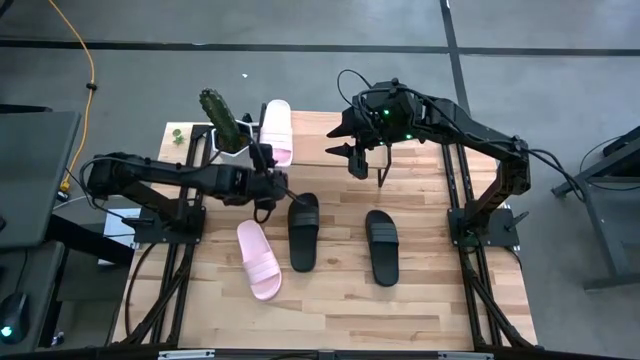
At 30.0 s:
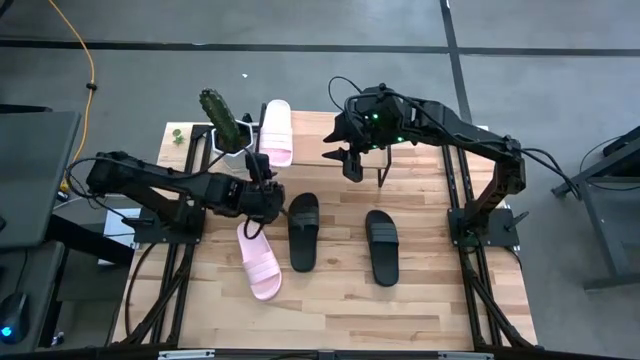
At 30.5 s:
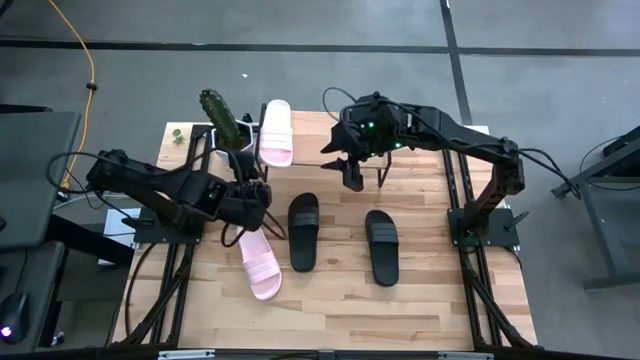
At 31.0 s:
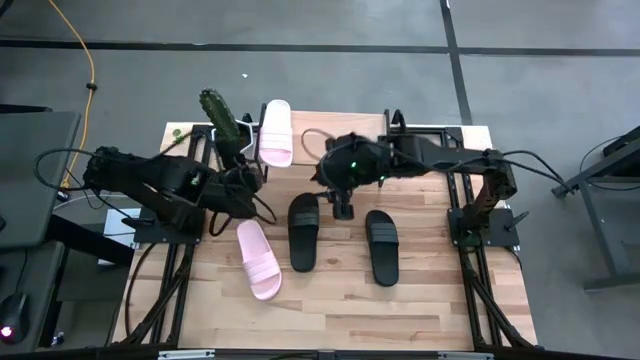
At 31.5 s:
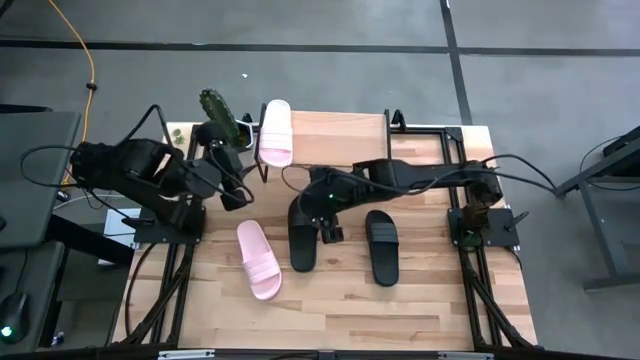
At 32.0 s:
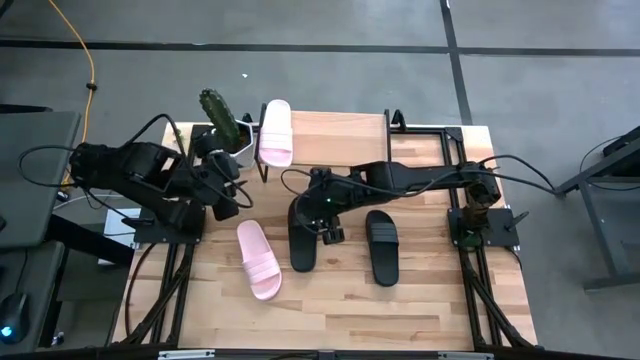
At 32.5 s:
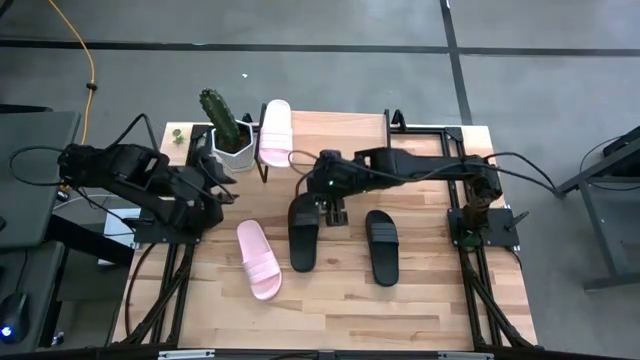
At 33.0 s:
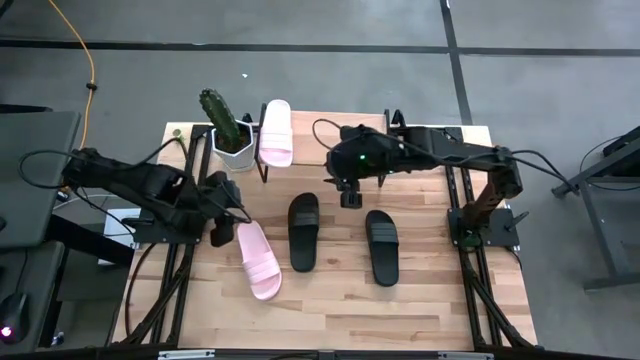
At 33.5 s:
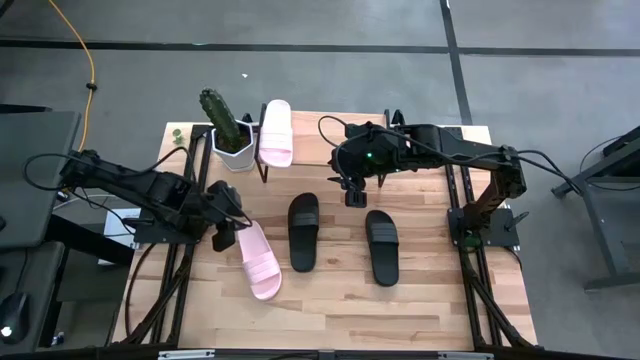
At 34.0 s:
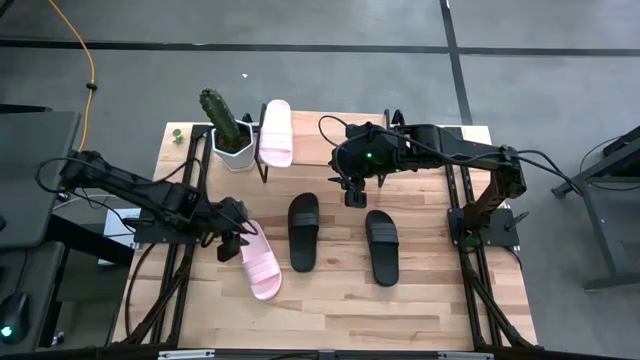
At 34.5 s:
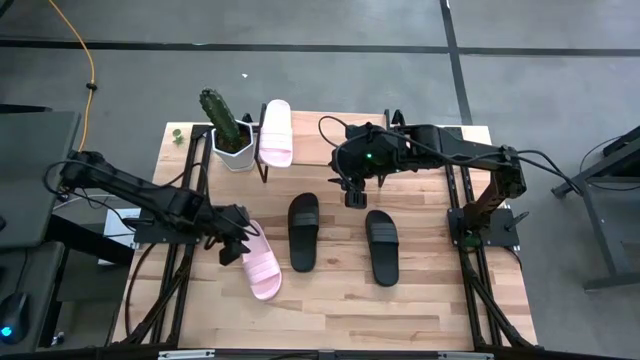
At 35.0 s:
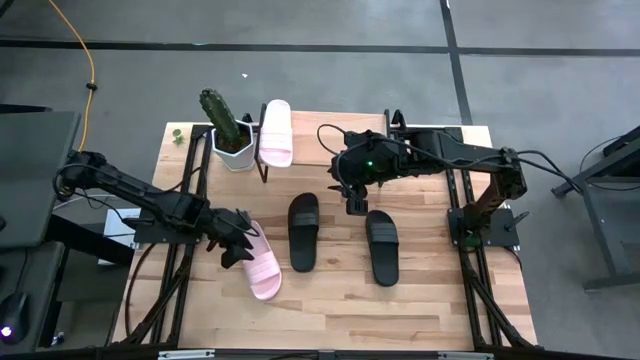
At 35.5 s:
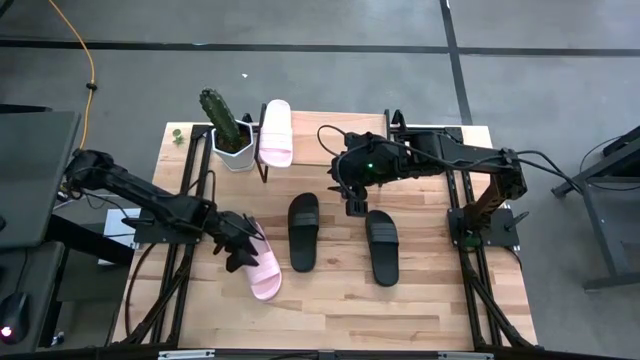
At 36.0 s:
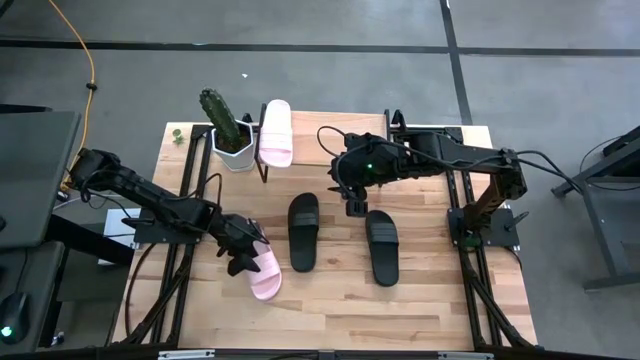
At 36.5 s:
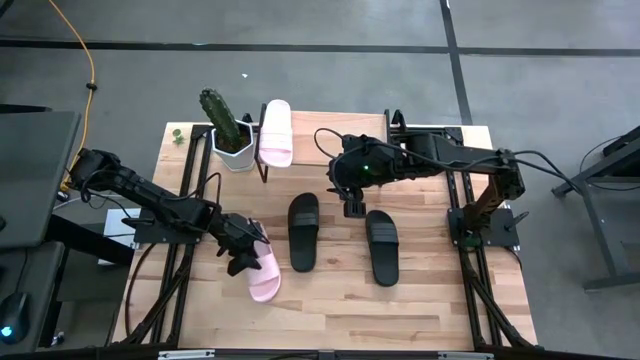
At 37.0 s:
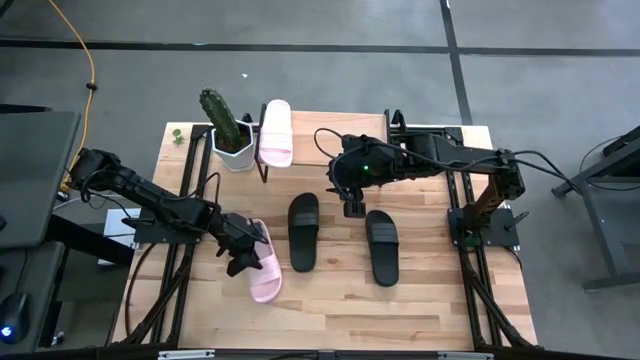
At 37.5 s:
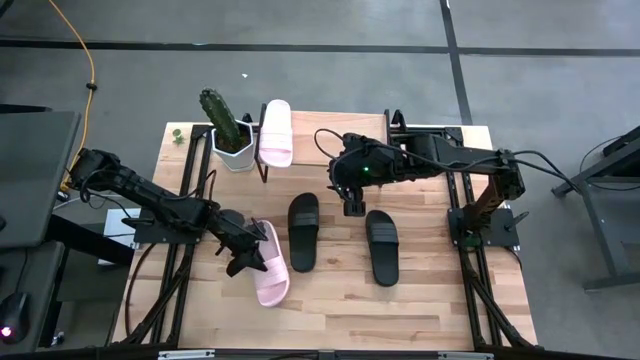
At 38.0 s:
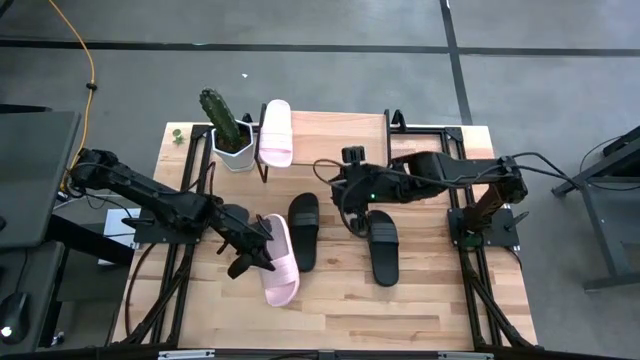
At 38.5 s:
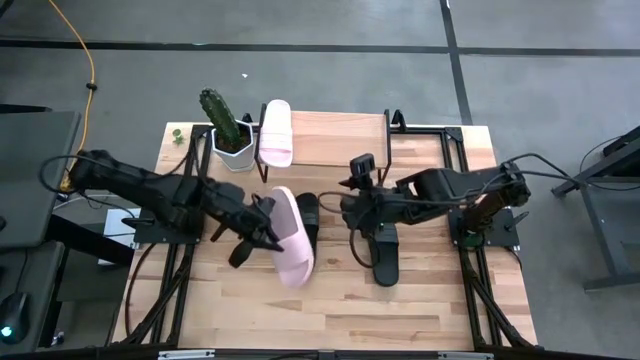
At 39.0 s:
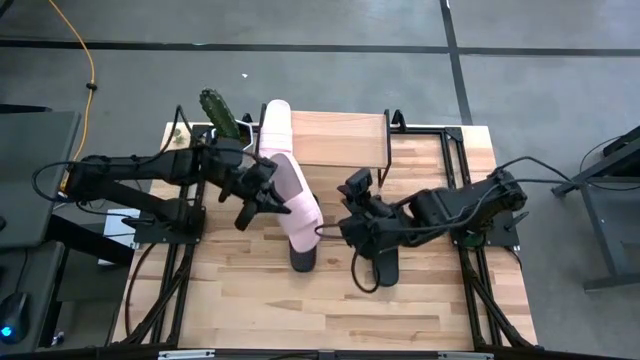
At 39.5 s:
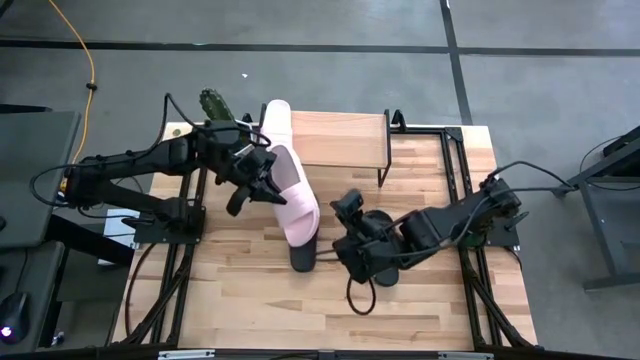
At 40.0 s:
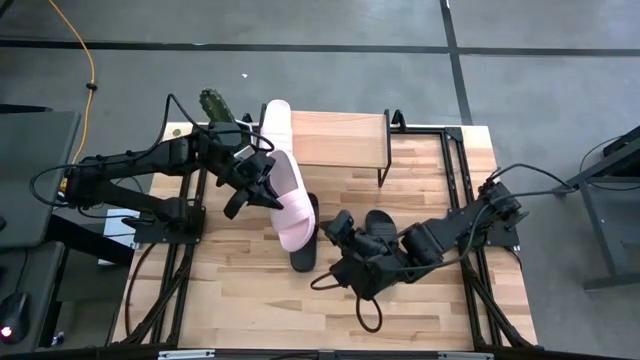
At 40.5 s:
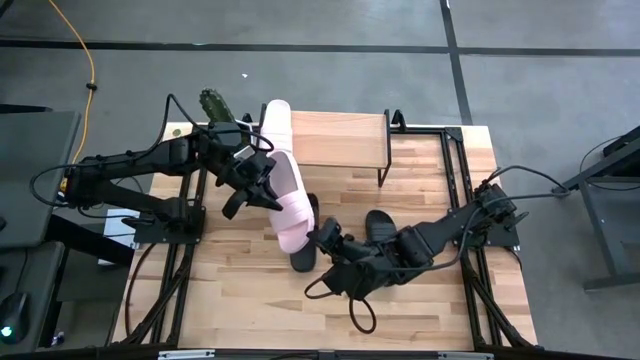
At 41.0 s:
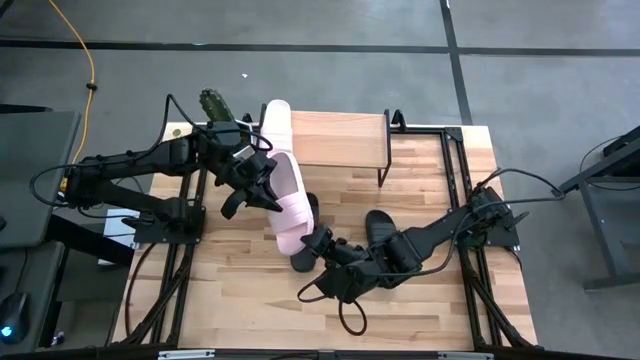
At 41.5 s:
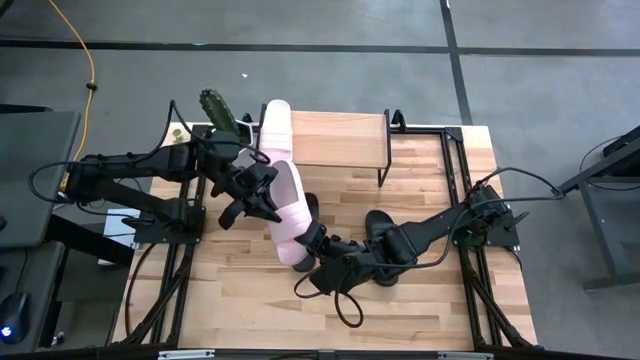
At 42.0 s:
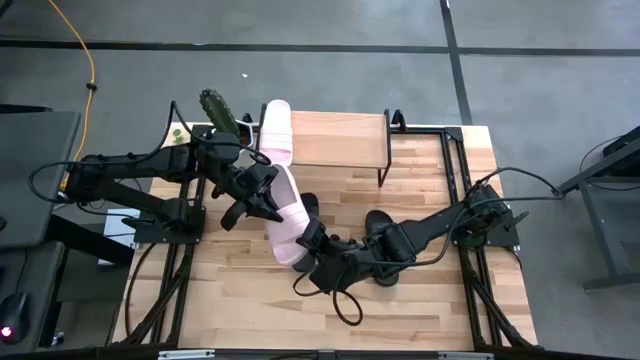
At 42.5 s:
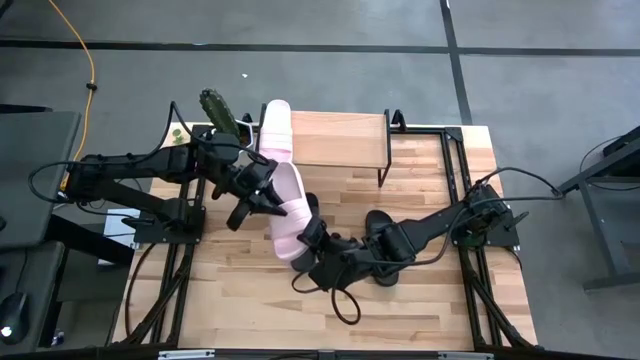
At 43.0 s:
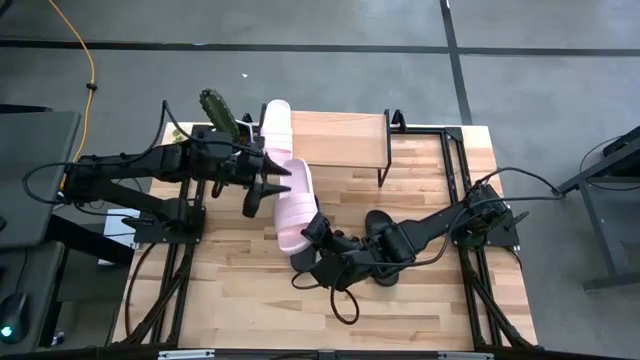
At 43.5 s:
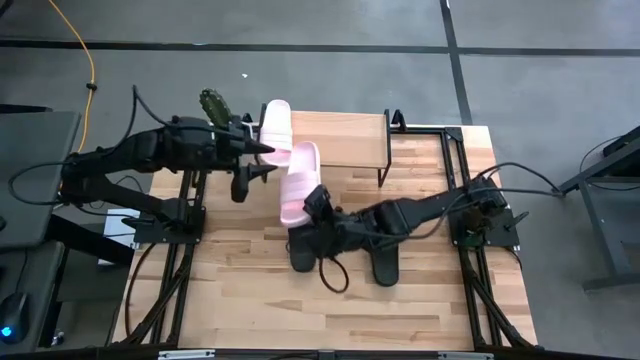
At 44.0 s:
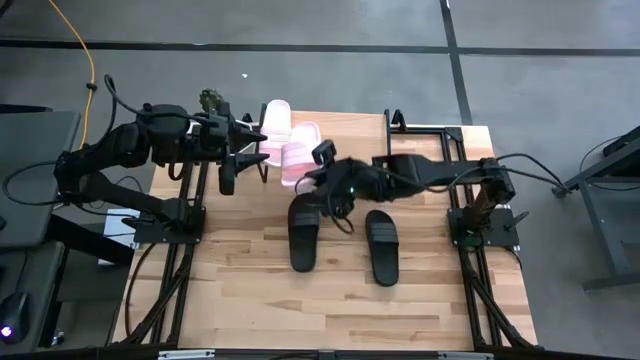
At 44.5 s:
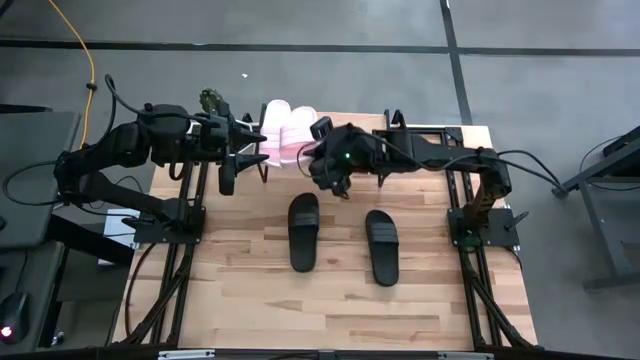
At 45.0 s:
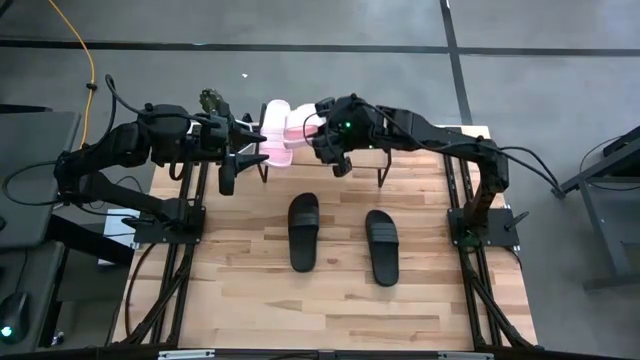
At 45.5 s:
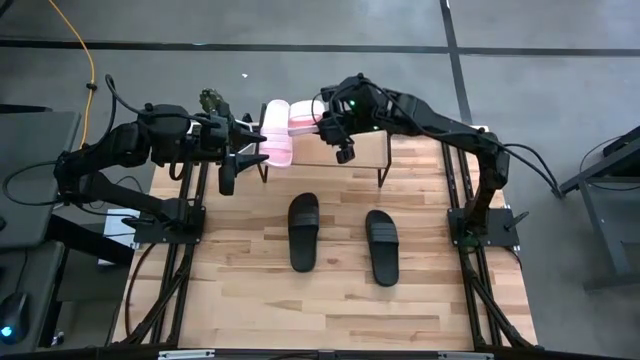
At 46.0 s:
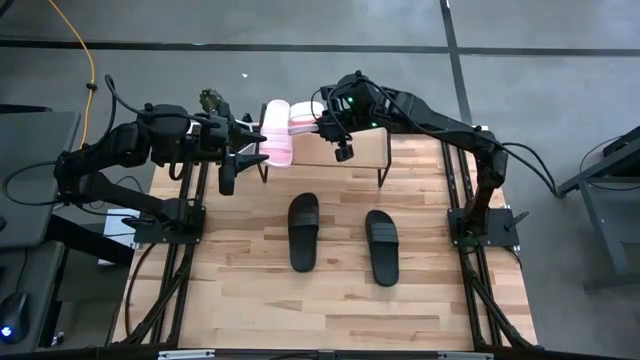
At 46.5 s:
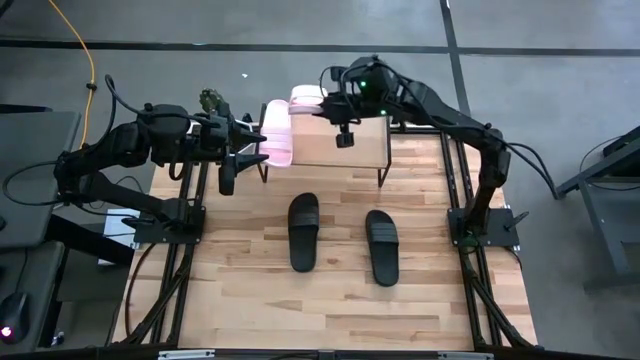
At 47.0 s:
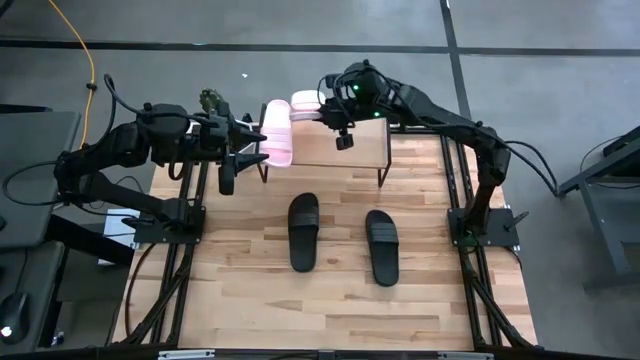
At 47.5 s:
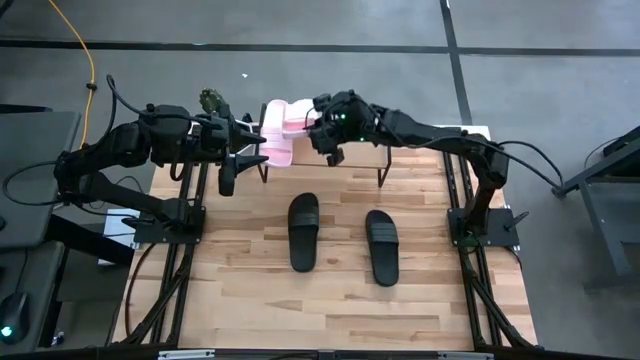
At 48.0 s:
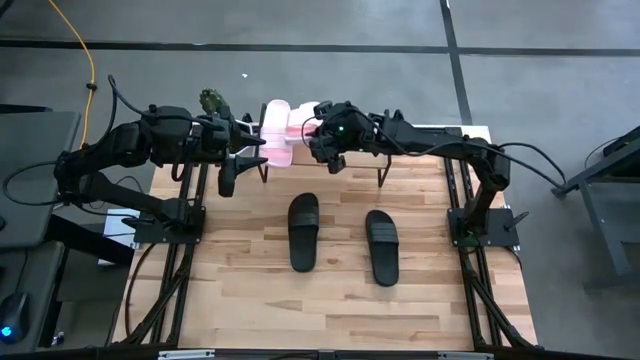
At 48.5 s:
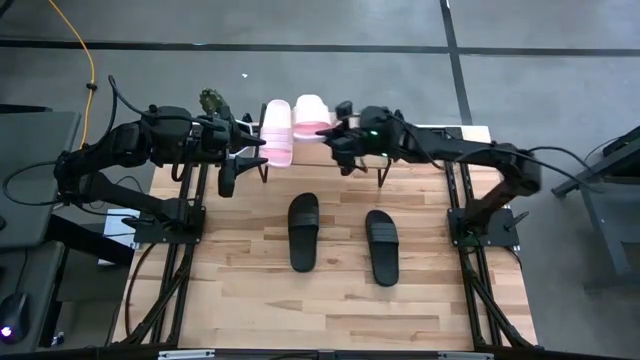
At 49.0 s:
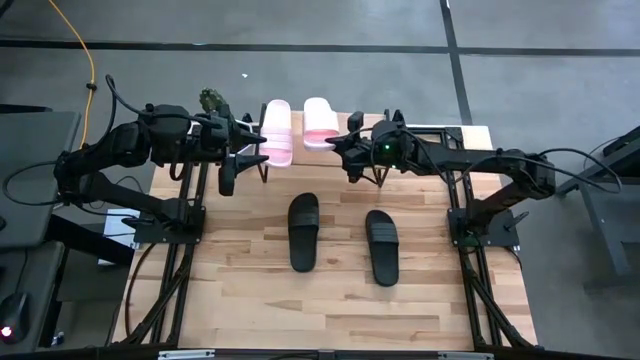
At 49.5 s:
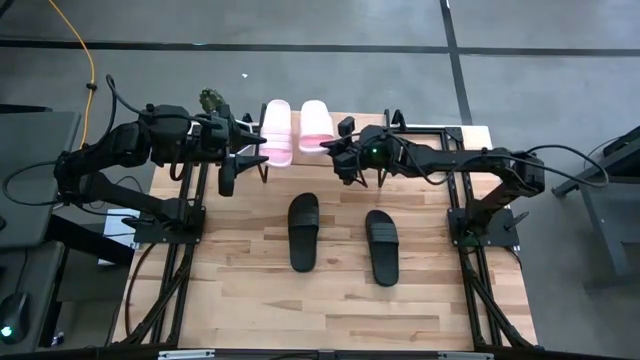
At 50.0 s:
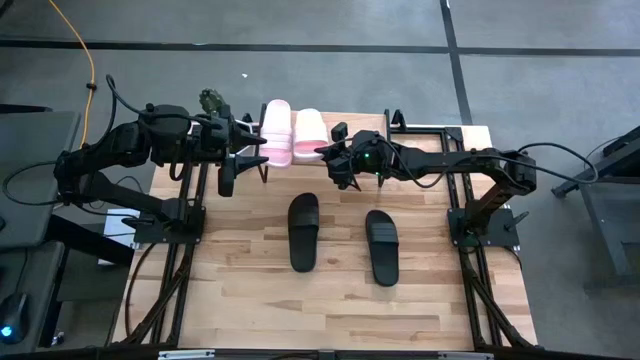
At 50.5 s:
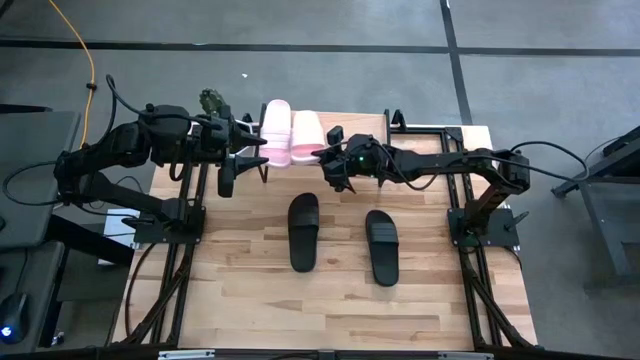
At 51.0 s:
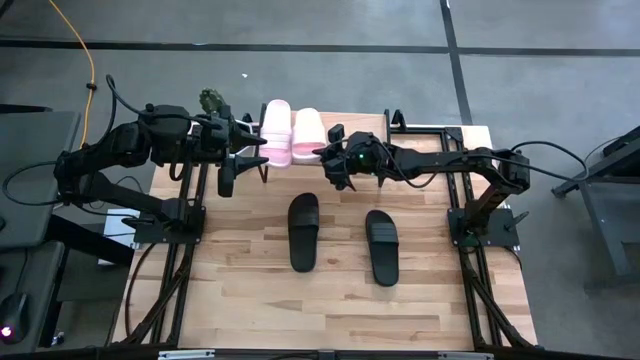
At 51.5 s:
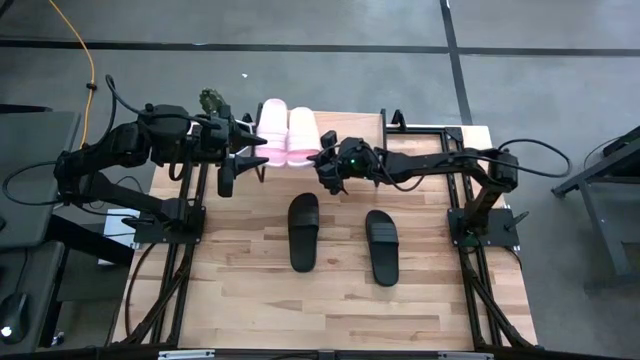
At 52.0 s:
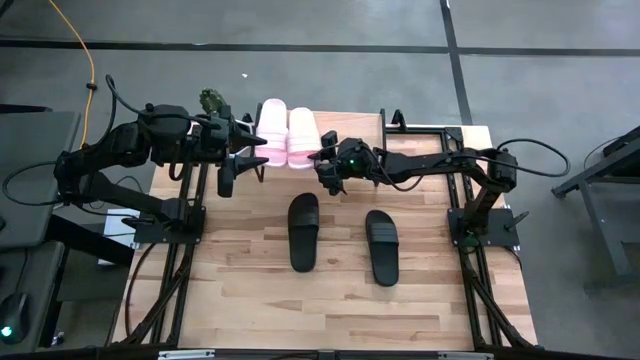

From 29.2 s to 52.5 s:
Task: Pick and place slides into the shelf
Put the pink slipper on the shelf
